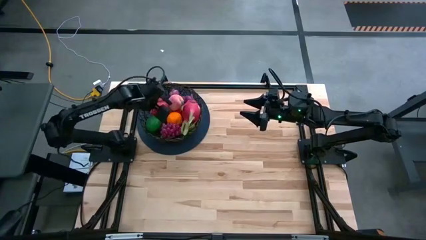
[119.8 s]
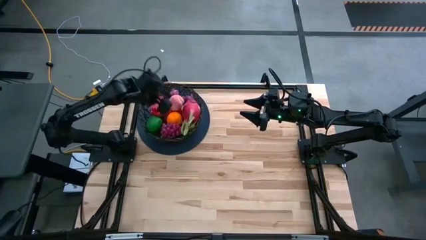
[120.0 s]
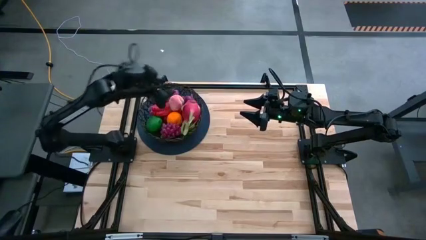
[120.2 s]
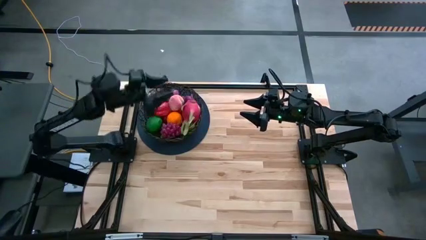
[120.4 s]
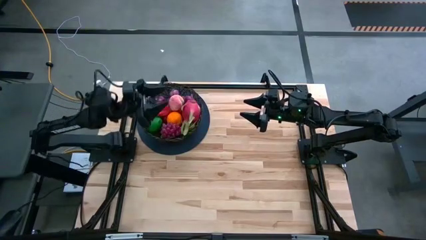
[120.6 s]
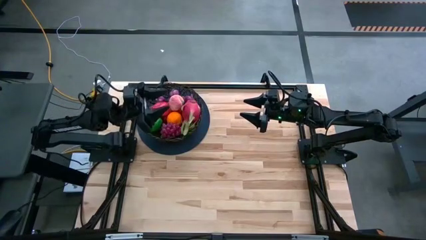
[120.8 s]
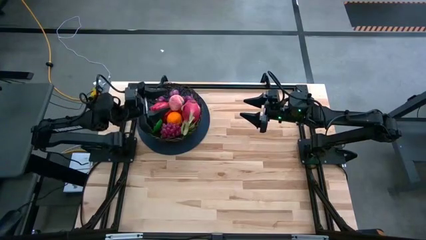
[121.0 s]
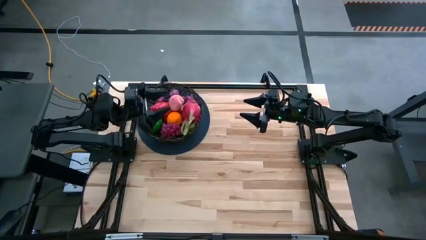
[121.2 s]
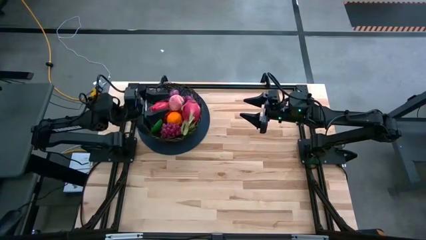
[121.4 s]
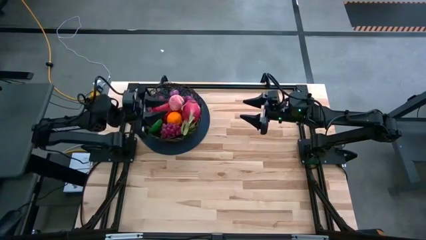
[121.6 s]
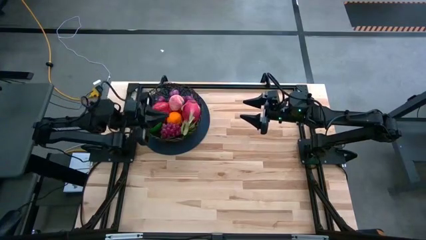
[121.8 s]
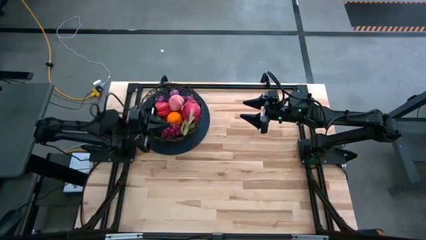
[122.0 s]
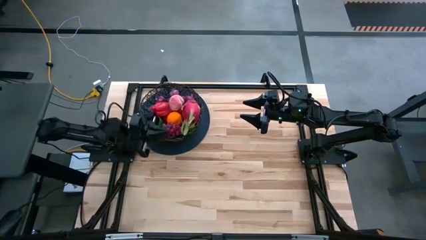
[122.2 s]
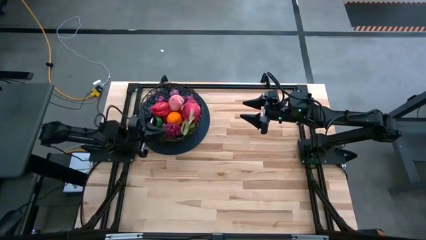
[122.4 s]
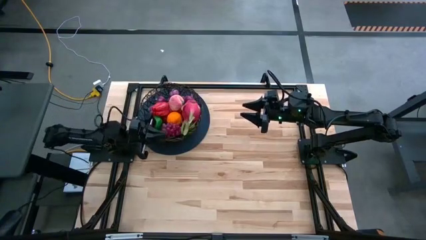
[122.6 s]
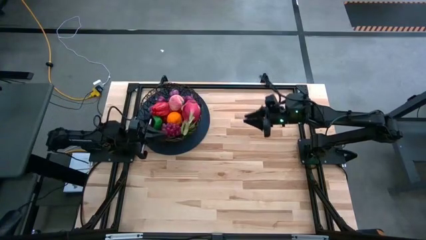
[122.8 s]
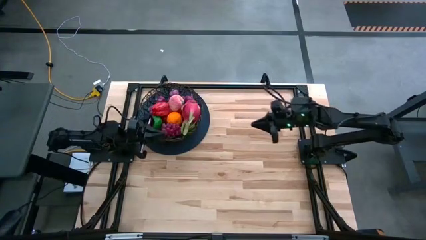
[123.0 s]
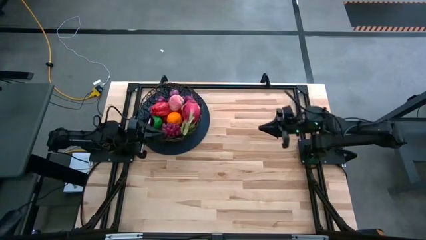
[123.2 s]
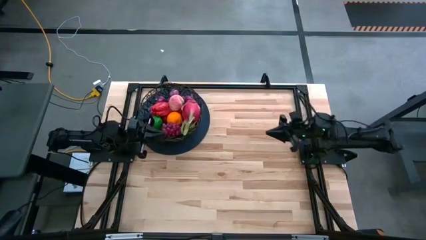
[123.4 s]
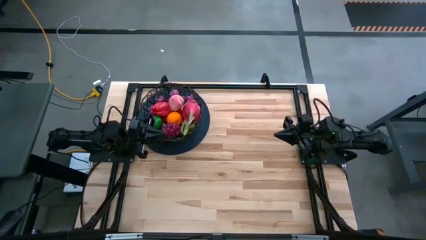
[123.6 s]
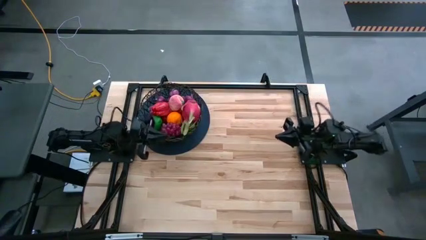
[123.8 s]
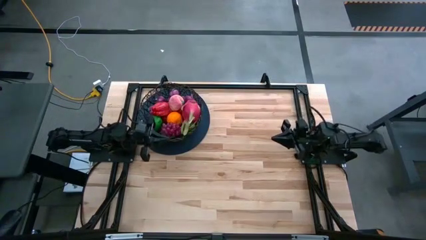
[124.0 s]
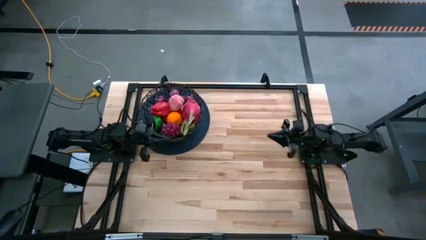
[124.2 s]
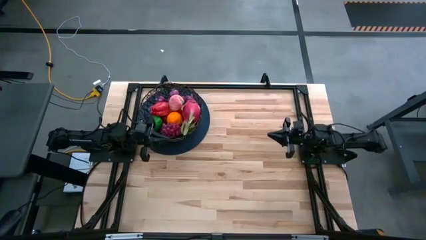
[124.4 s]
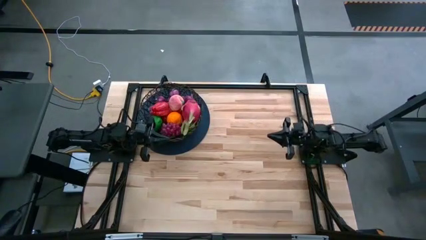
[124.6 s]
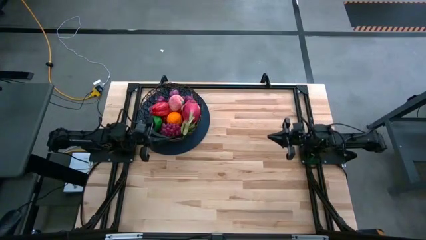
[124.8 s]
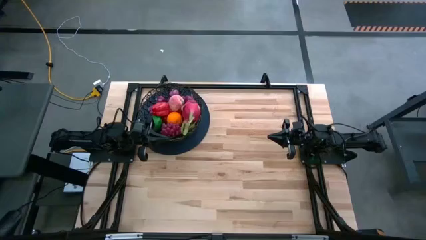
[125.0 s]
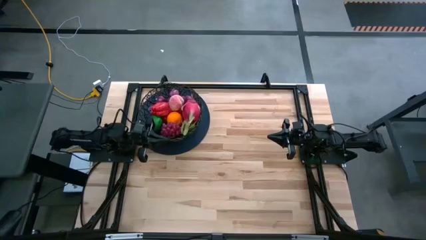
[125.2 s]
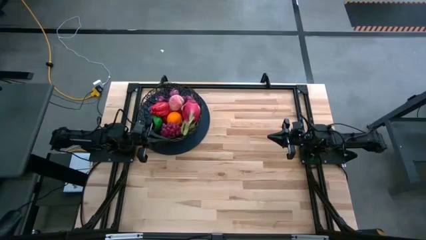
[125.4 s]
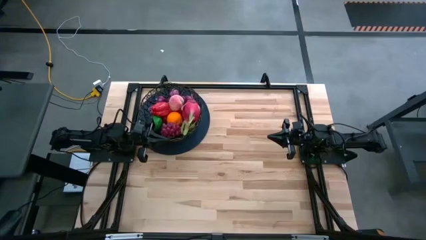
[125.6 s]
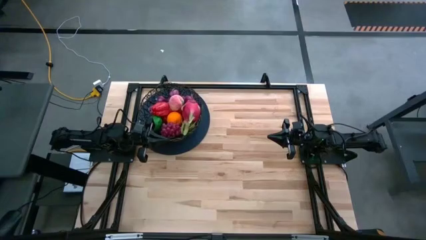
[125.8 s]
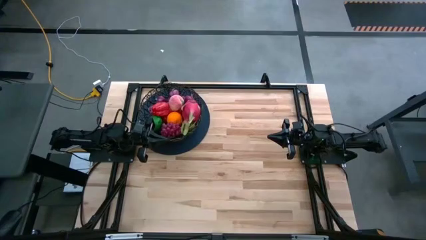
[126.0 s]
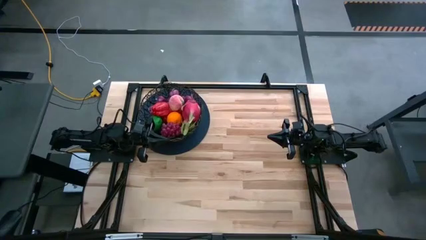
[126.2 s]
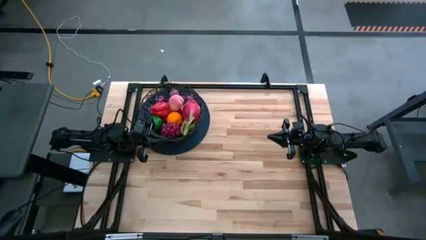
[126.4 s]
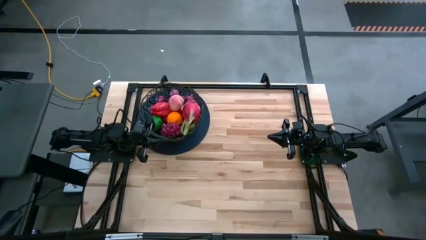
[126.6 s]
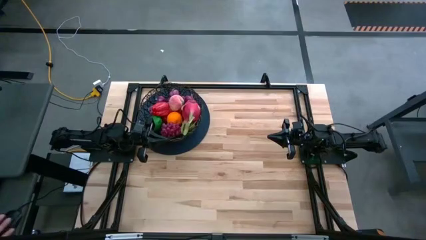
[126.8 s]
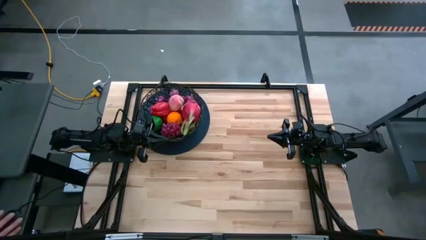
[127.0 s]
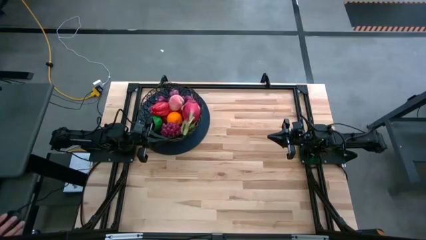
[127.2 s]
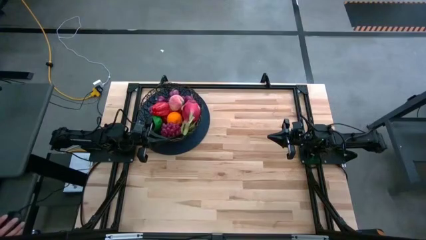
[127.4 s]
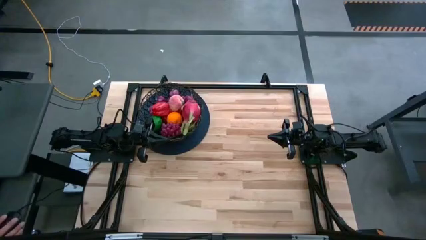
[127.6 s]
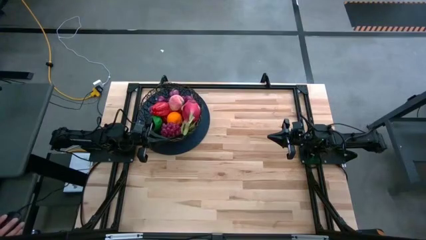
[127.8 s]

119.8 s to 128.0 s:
Task: Build produce basket
Return to Home Position

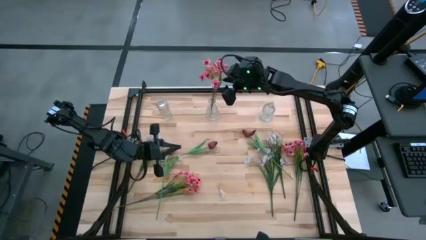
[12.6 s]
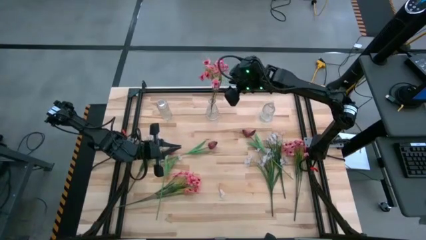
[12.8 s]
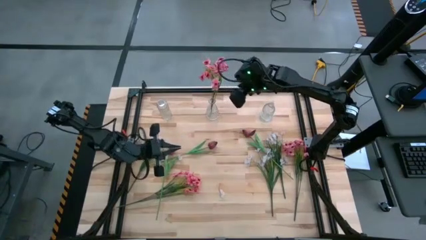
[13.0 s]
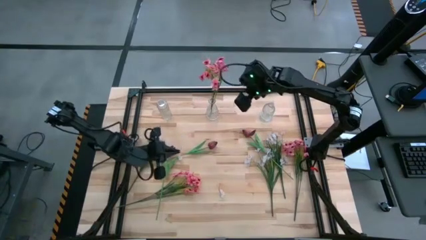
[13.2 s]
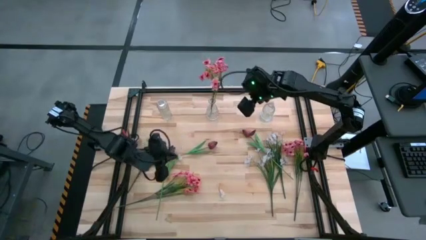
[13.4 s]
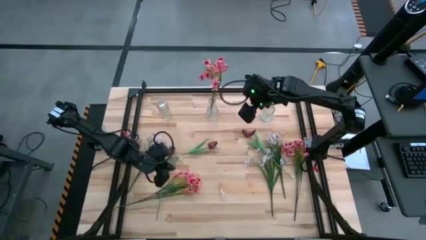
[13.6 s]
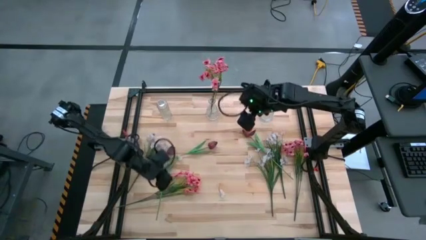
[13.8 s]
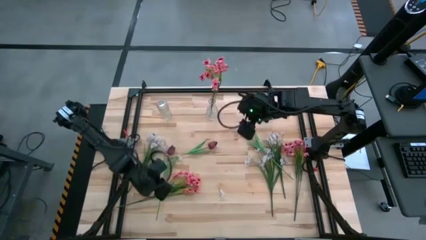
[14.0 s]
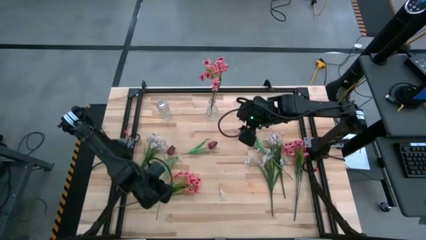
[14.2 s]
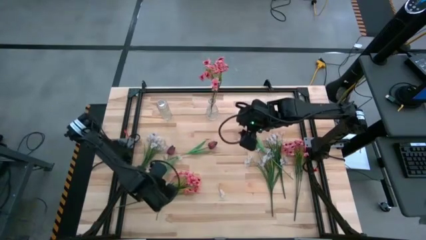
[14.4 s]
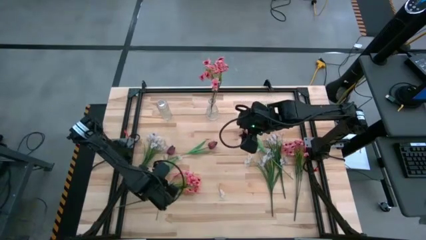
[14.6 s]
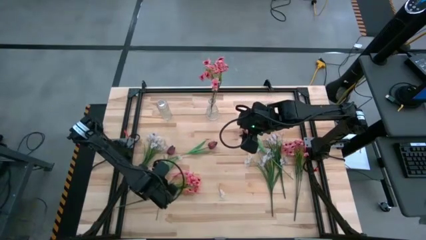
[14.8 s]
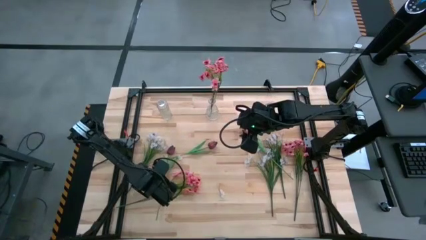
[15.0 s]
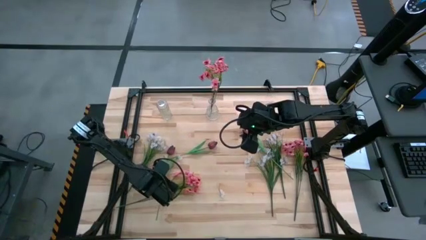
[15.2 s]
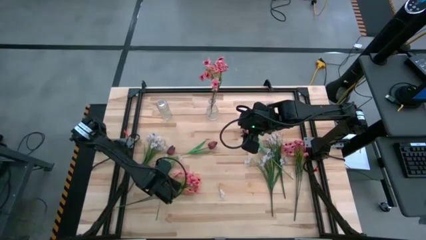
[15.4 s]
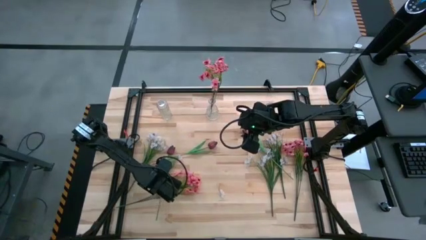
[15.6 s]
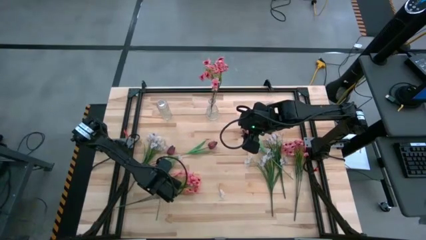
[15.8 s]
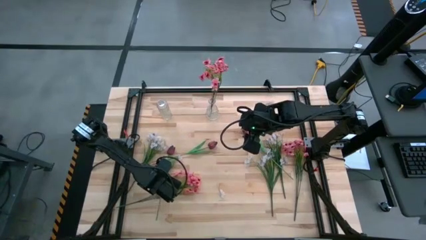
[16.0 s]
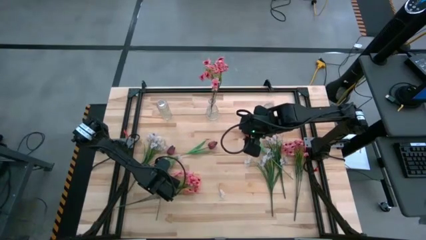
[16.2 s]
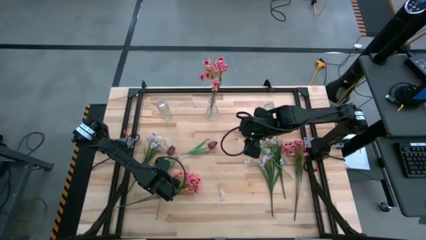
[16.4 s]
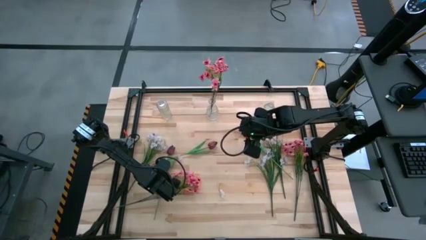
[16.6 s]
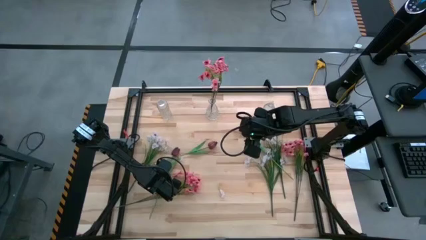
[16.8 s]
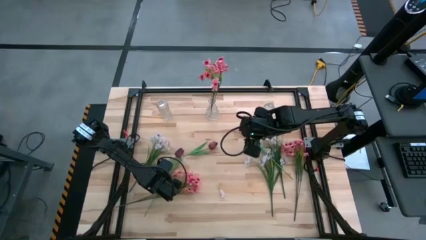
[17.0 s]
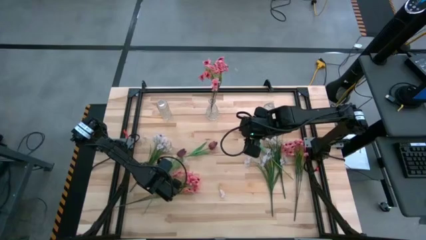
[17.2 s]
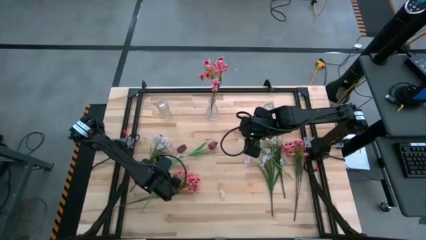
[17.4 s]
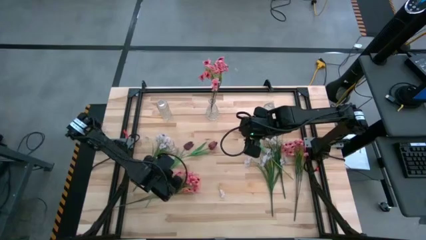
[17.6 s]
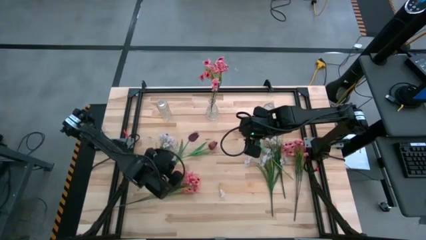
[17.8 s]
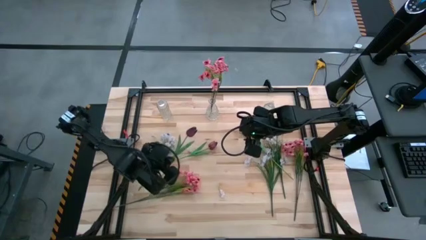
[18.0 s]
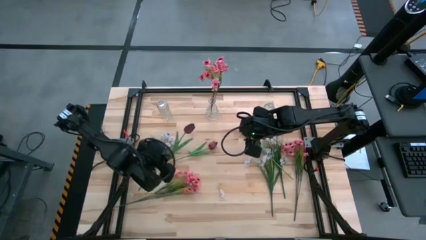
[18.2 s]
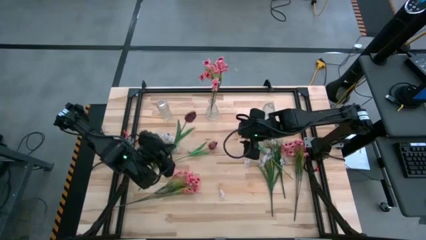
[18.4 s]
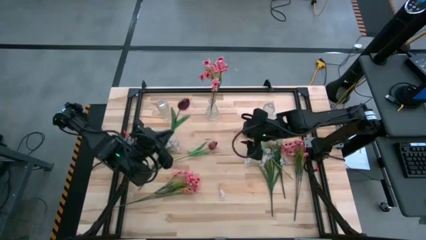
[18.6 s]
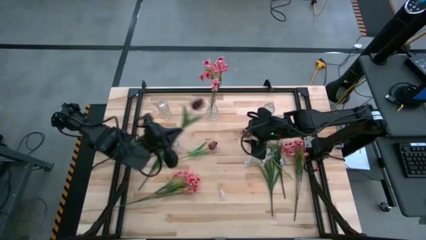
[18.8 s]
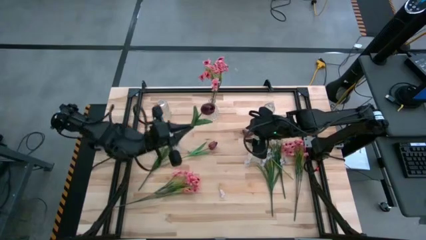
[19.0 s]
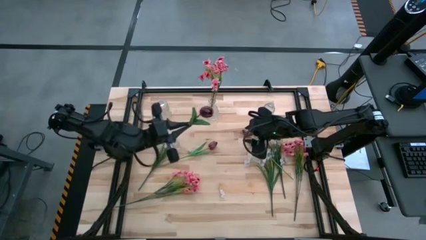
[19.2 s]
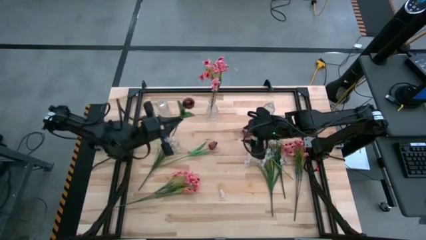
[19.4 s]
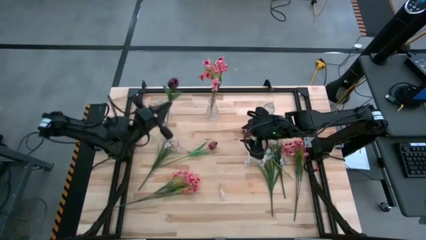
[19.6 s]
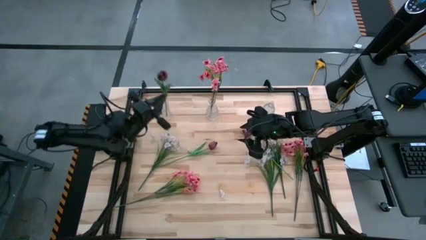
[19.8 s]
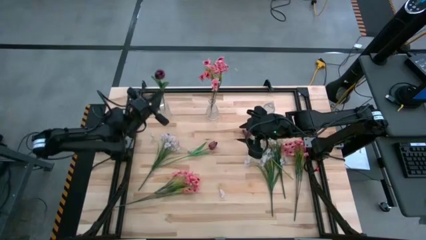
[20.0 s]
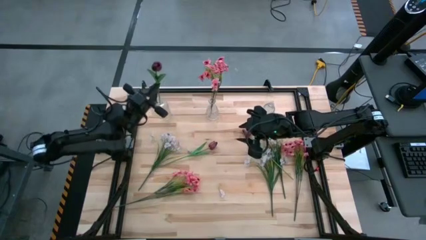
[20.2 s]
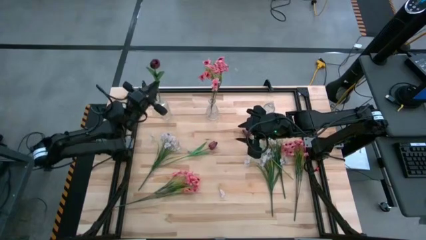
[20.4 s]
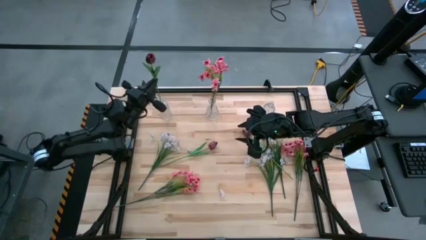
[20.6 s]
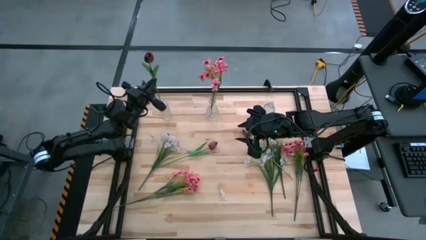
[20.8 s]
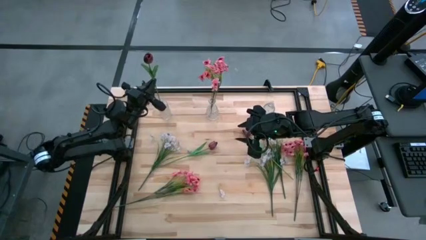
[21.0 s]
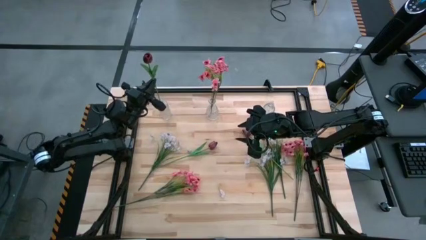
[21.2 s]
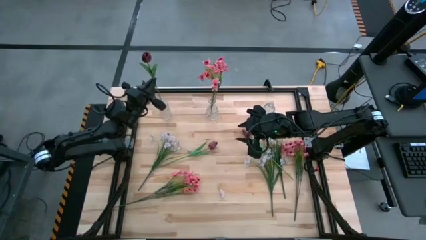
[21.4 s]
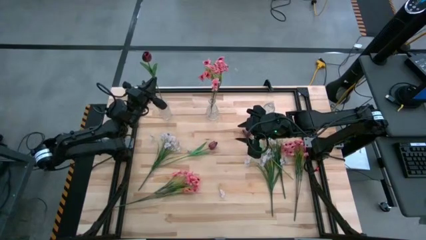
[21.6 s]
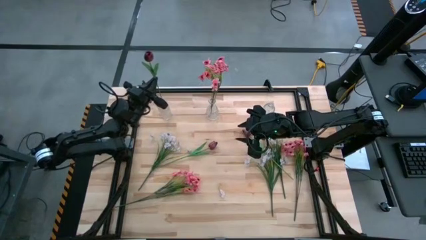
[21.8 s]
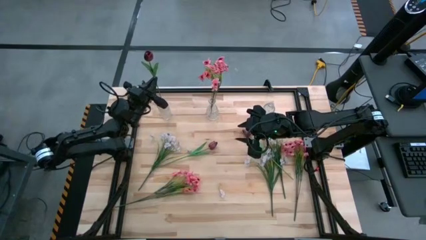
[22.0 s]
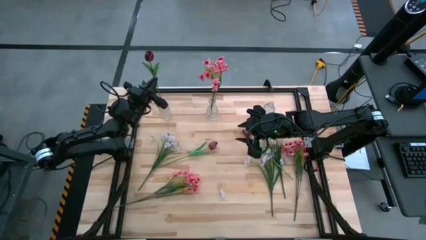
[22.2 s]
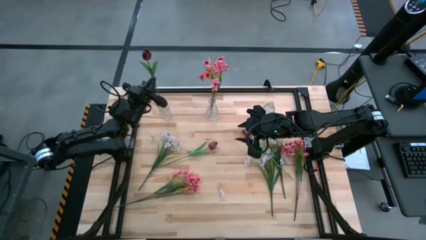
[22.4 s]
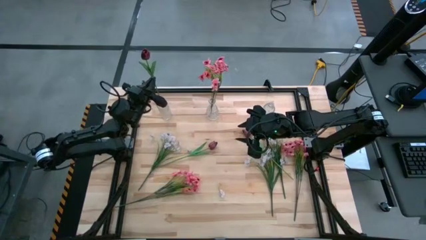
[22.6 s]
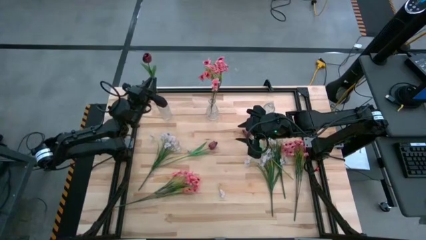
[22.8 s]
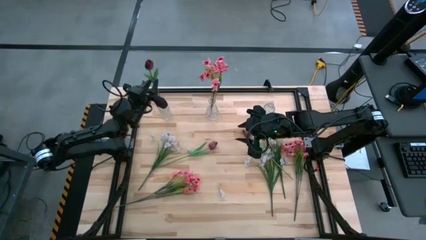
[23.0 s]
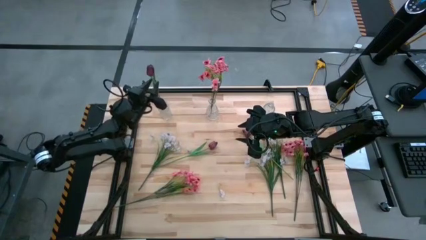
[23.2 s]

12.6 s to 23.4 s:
Task: Sort flowers into vase by color
Put the purple red tulip into the left transparent vase
